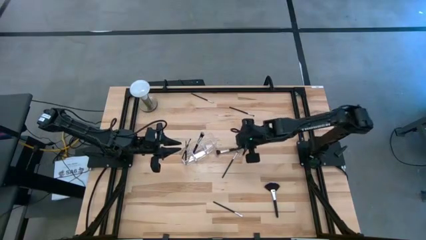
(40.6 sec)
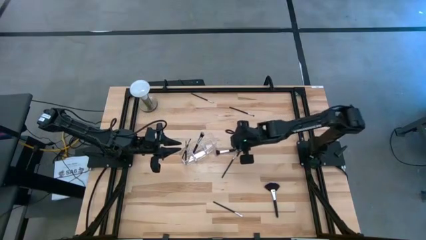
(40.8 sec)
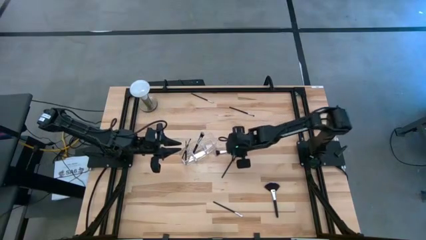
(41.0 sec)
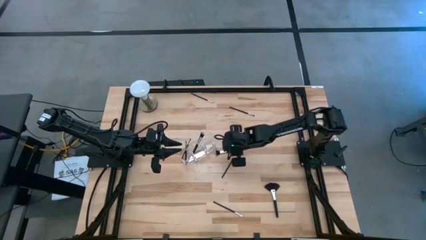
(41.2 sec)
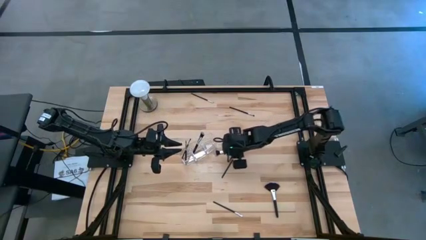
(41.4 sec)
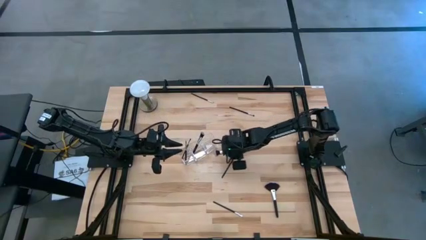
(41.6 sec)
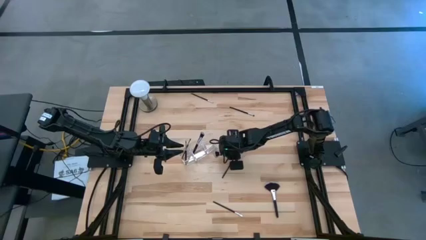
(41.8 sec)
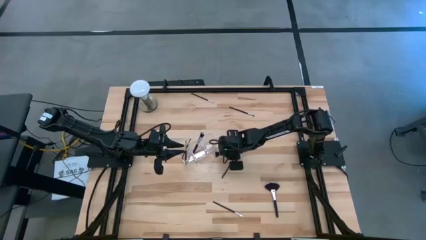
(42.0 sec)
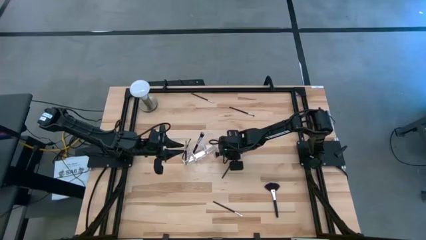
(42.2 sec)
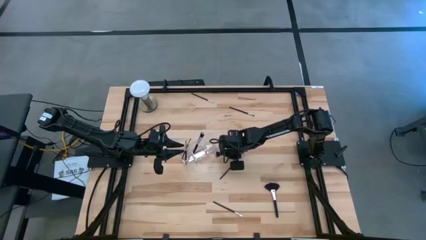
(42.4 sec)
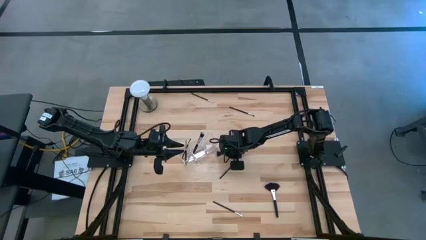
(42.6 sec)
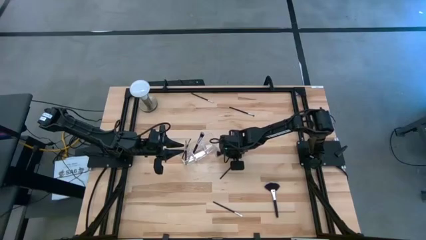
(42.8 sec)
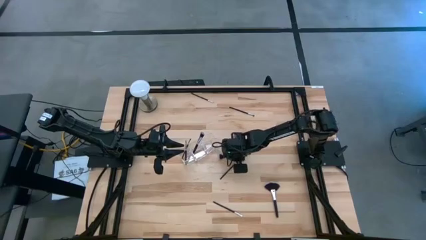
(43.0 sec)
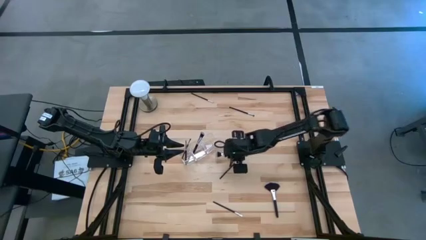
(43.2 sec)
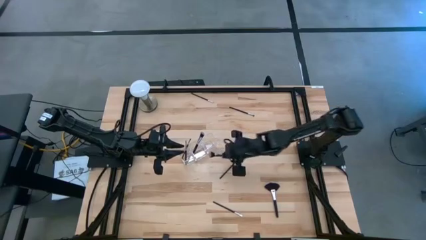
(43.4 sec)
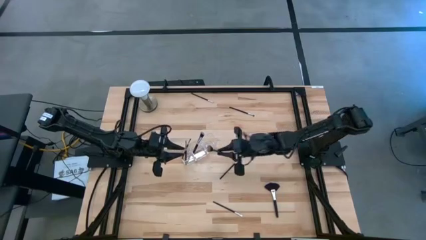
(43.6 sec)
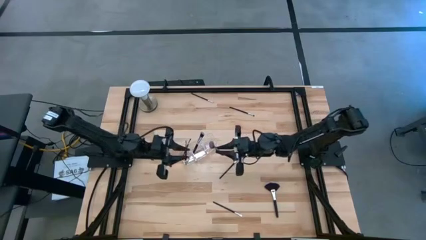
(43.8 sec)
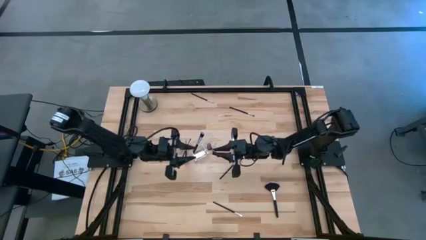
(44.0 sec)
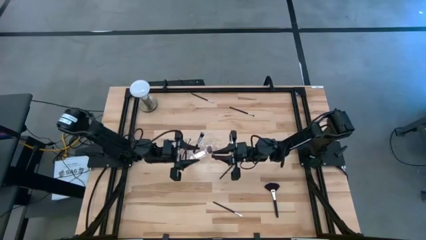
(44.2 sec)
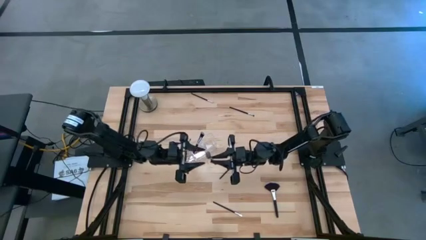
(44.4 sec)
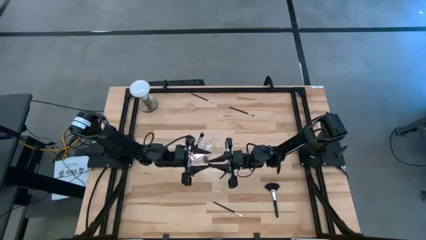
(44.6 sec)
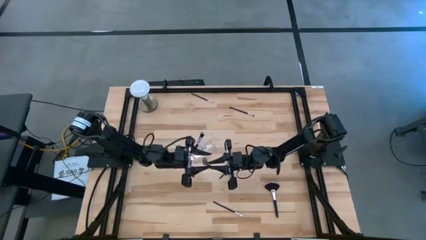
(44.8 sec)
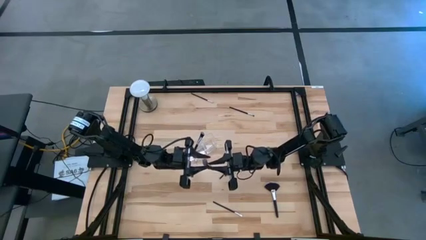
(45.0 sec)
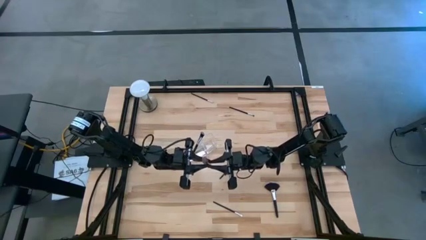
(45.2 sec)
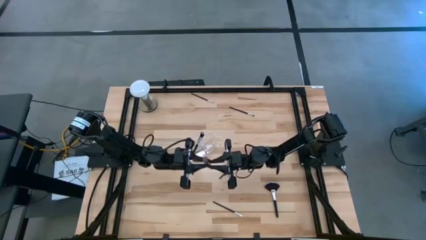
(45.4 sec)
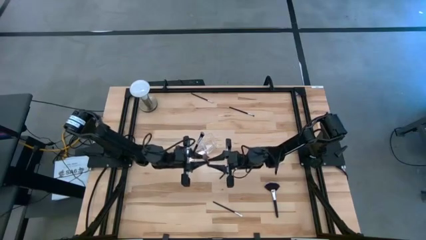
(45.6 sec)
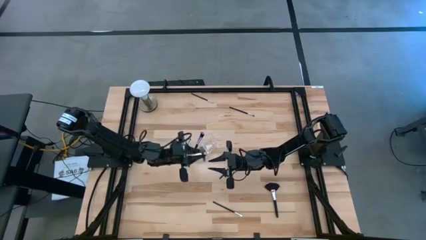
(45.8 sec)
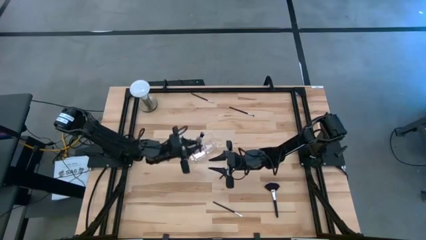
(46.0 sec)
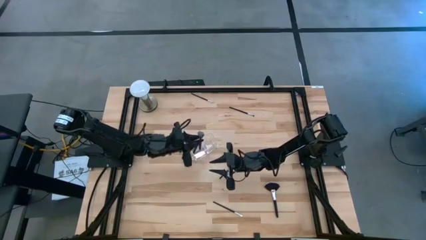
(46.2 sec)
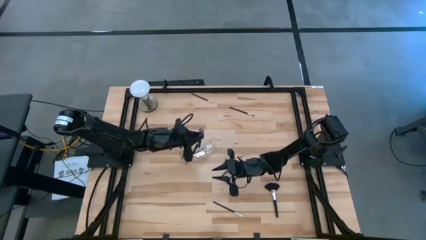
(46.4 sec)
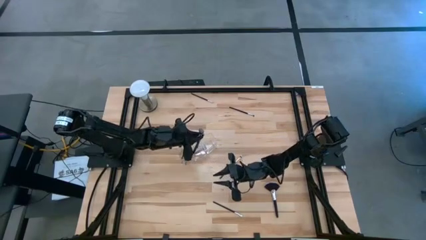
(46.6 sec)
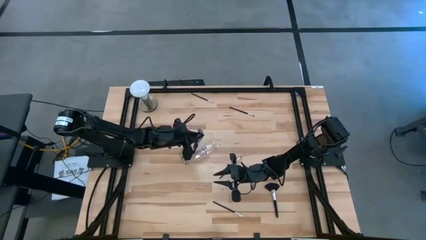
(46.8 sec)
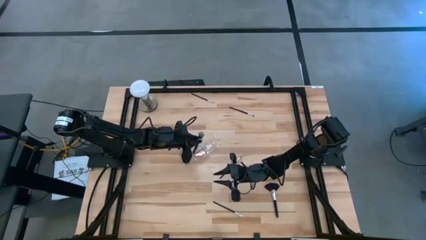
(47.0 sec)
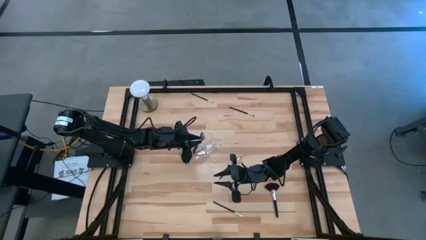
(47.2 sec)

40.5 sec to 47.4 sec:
Task: Put items in baskets/containers
Put the powder brush into the middle section of the transparent organizer

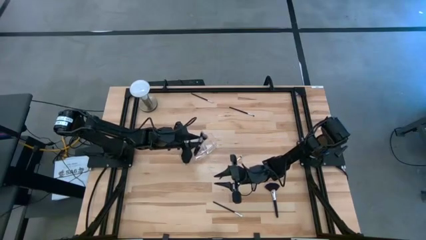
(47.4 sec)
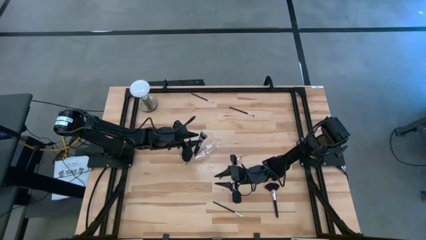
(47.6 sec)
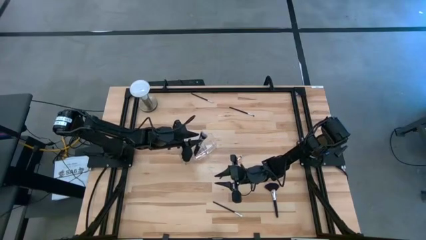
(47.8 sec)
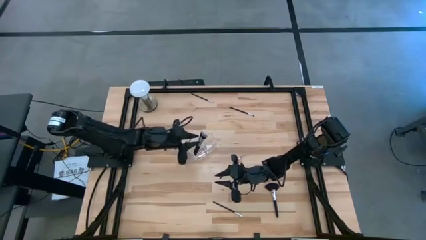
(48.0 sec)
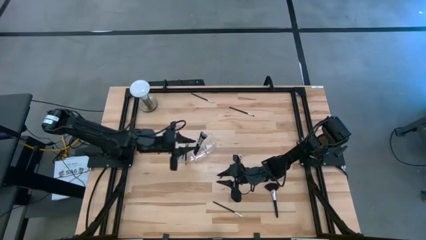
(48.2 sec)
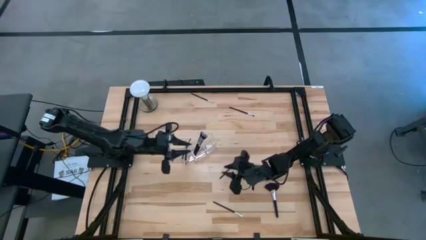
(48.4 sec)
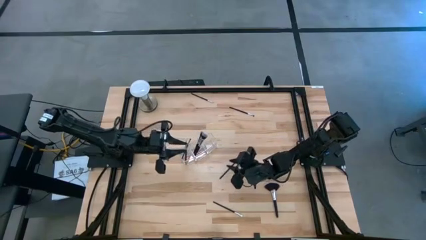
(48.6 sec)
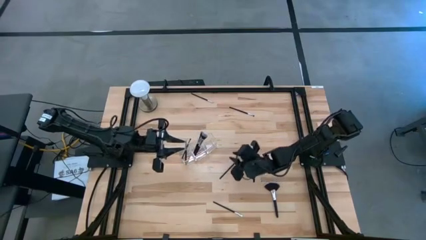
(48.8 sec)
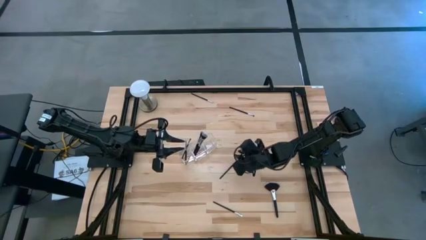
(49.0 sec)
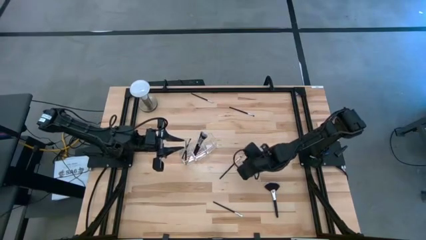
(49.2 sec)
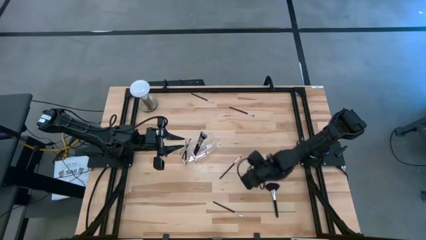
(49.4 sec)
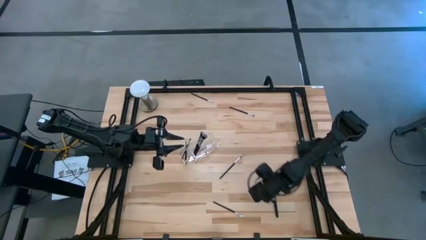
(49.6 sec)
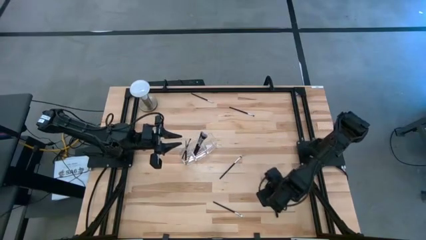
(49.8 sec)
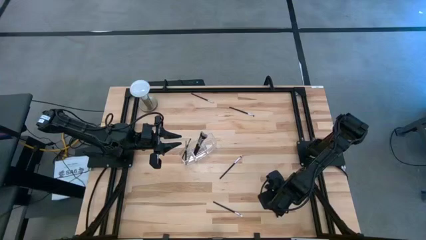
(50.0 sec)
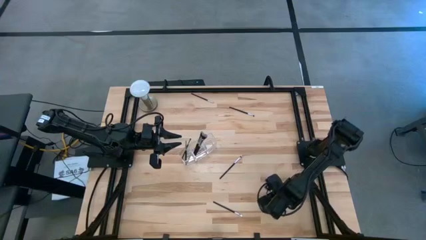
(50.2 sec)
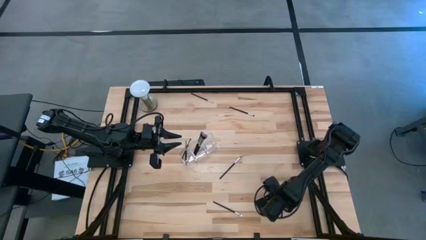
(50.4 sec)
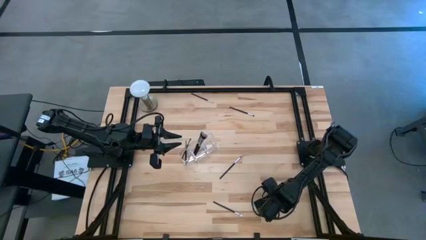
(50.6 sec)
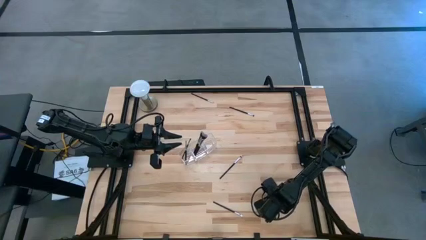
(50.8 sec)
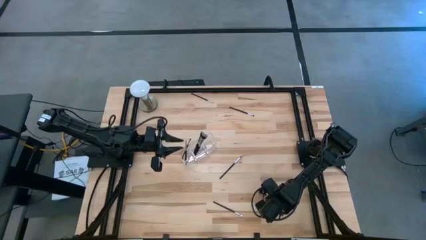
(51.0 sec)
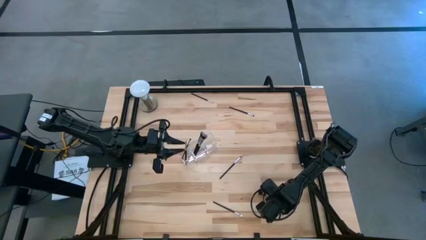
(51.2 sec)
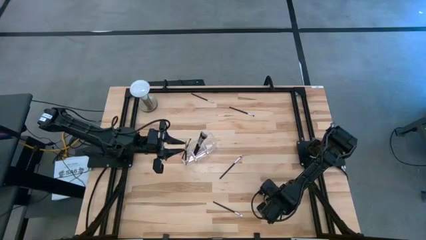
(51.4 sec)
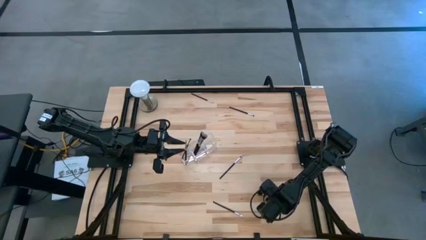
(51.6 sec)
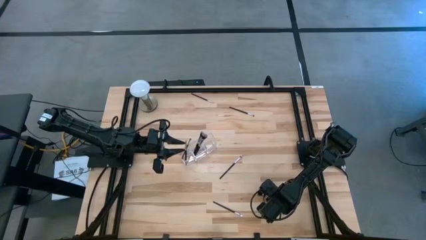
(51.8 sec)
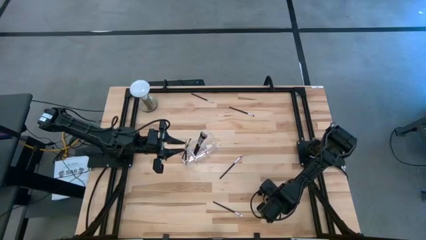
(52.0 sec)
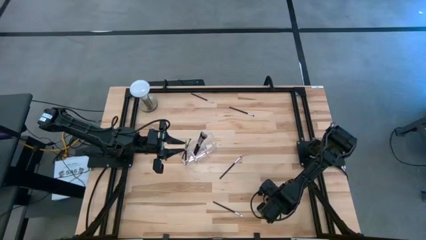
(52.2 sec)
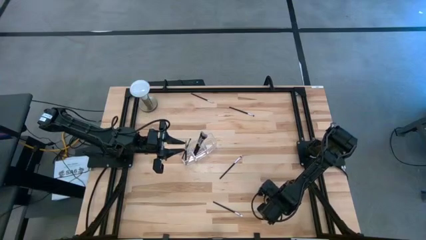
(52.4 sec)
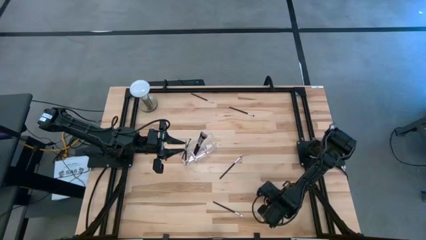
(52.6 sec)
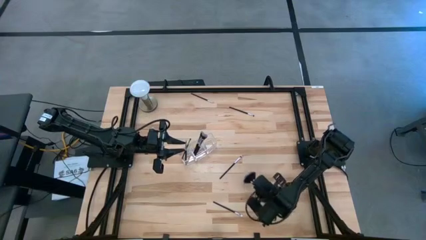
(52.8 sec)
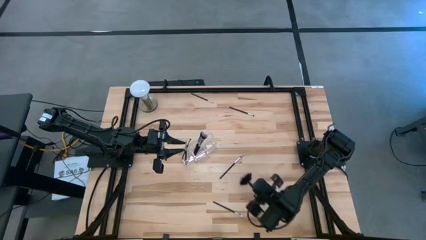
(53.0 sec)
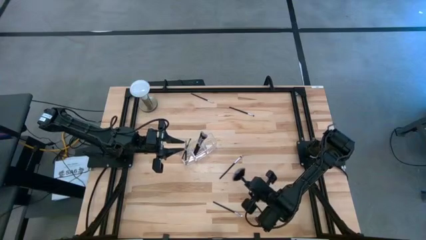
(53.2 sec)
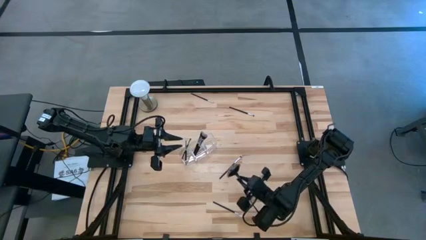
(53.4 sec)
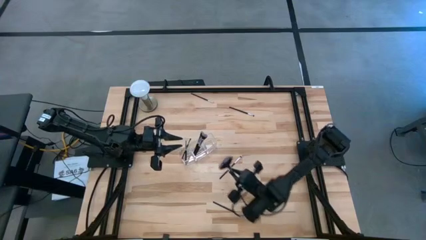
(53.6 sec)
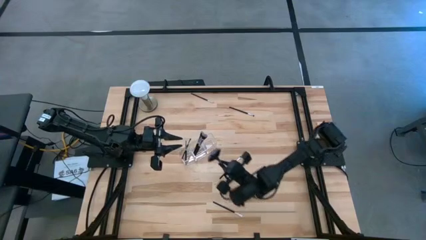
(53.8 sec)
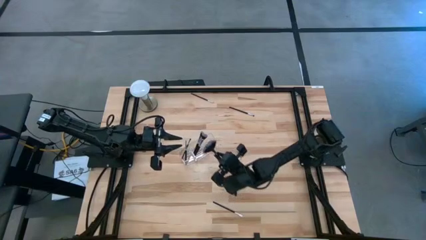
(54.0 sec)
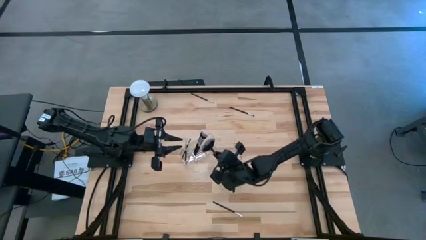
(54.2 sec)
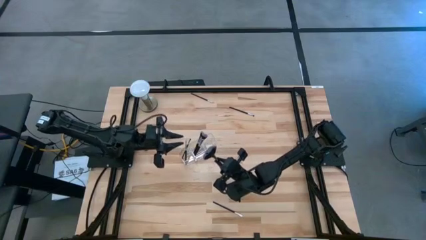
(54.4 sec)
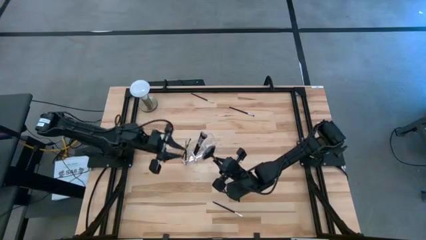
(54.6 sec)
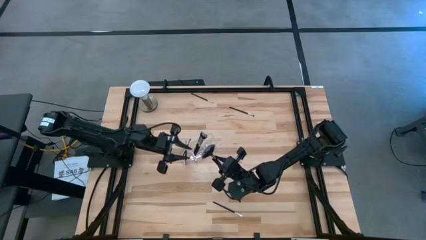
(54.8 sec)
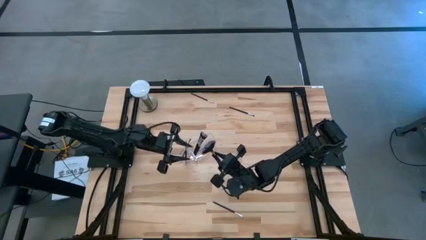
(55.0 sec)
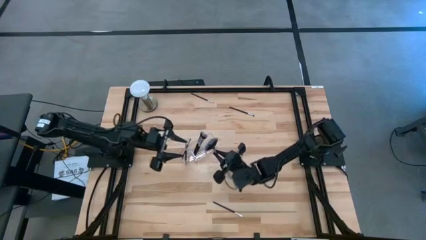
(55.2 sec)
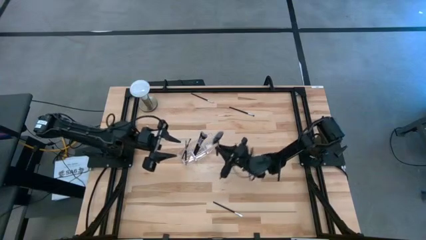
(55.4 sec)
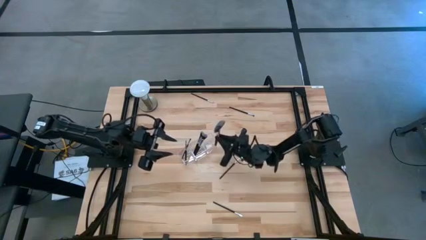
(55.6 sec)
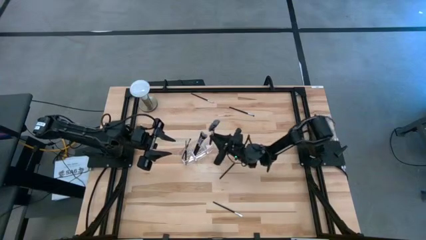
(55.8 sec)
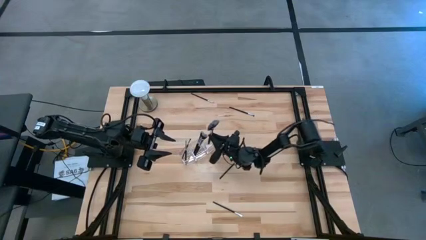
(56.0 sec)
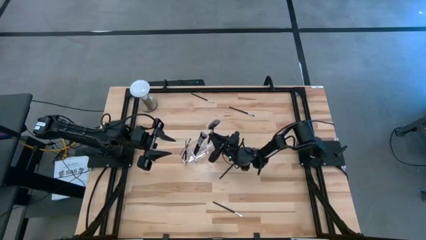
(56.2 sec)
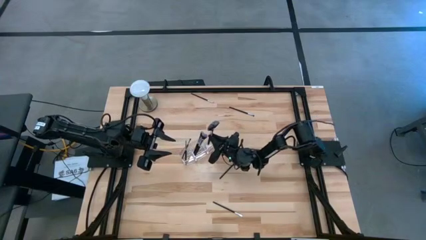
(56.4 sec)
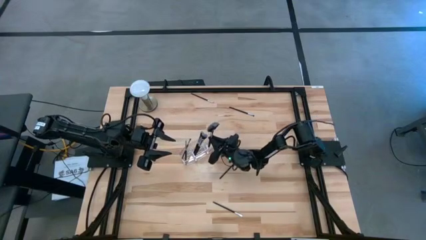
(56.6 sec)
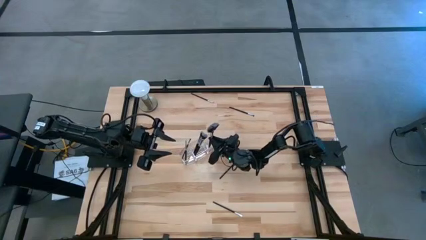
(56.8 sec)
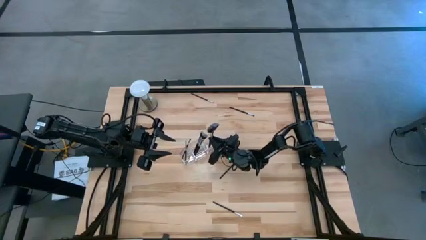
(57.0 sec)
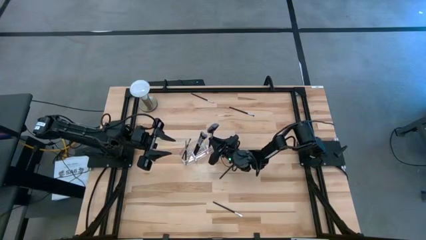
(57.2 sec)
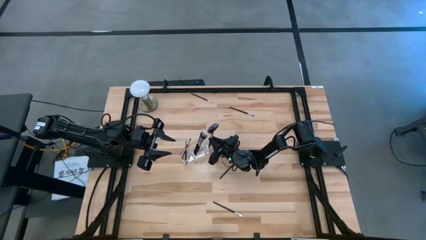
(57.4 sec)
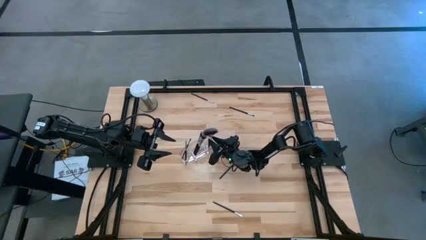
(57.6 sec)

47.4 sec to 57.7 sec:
Put the highlighter brush into the right section of the transparent organizer
